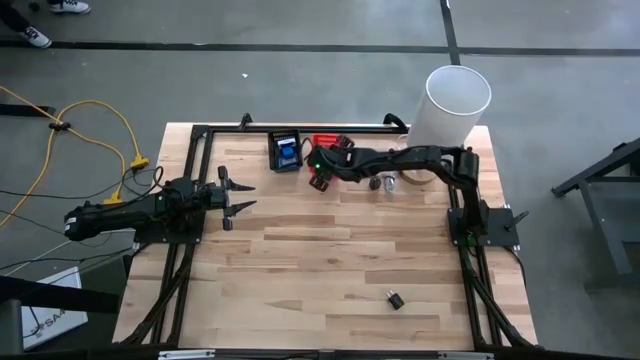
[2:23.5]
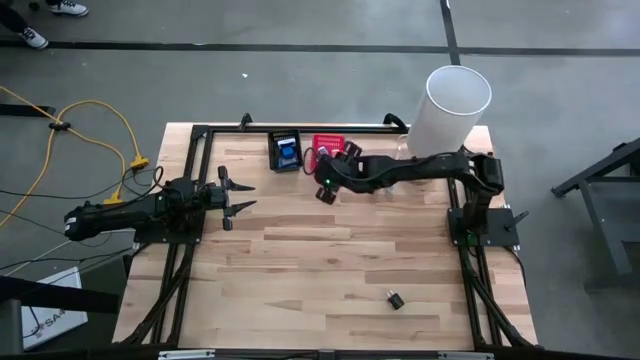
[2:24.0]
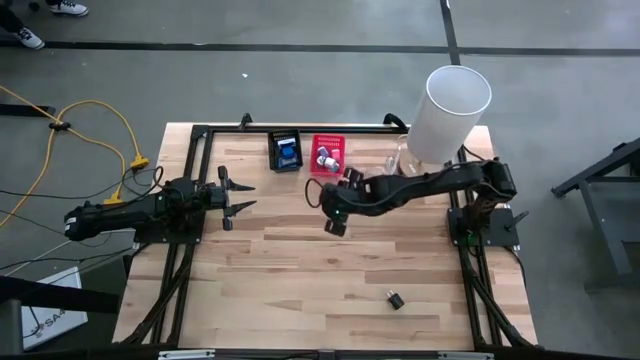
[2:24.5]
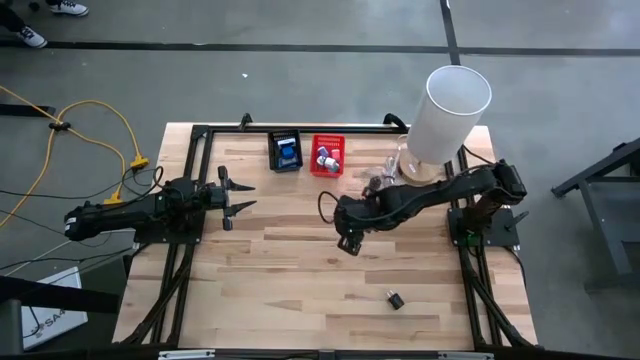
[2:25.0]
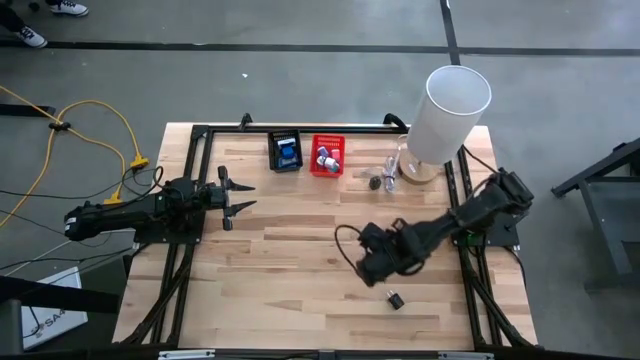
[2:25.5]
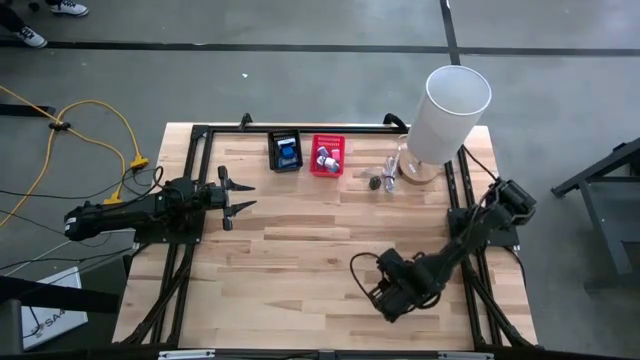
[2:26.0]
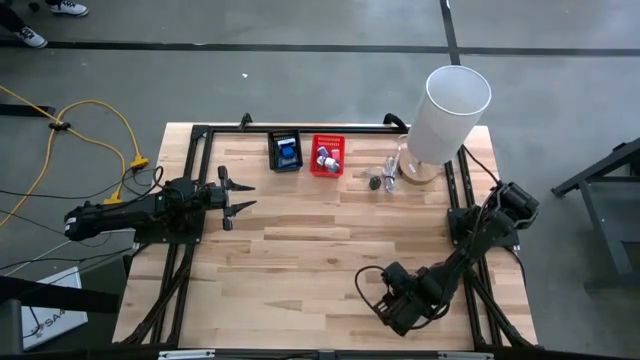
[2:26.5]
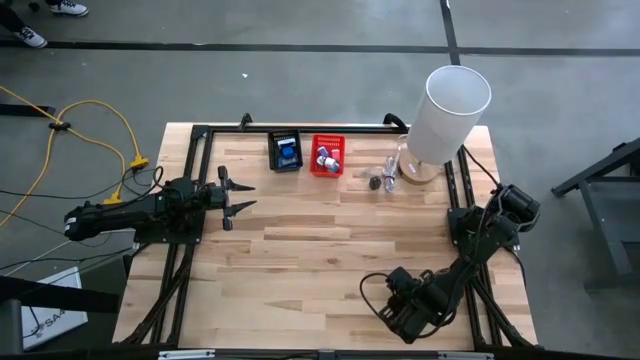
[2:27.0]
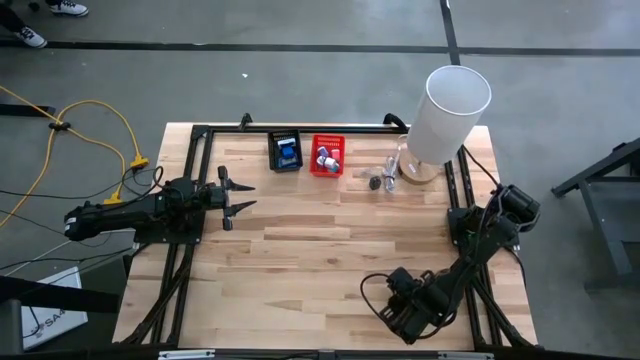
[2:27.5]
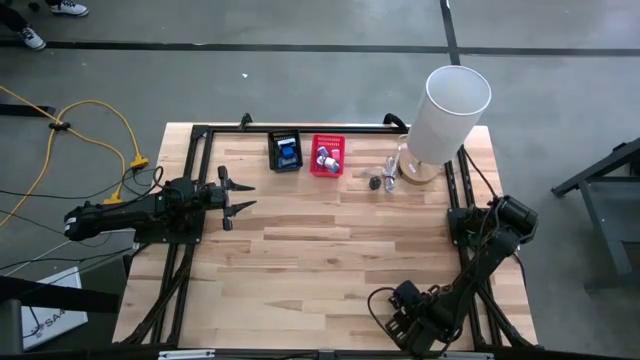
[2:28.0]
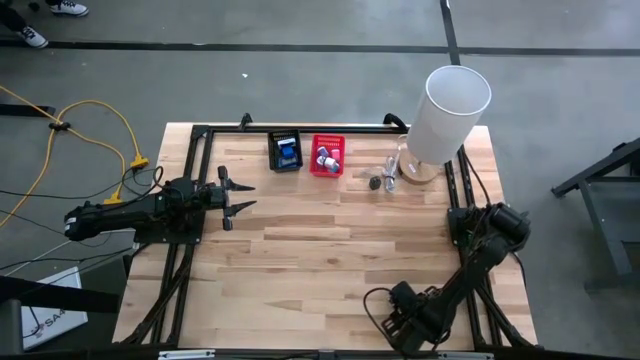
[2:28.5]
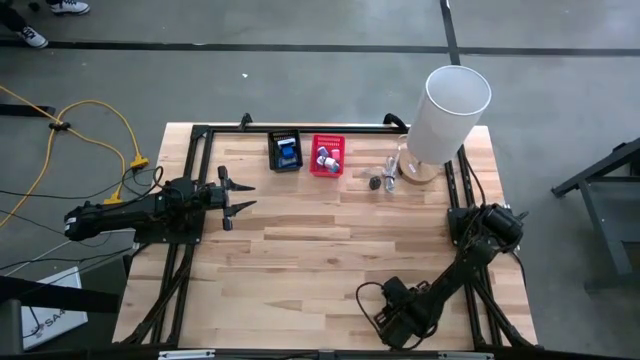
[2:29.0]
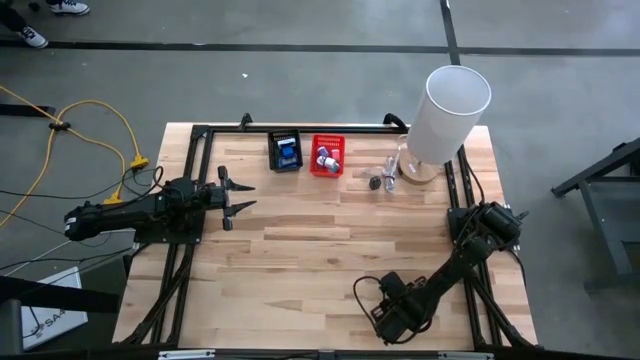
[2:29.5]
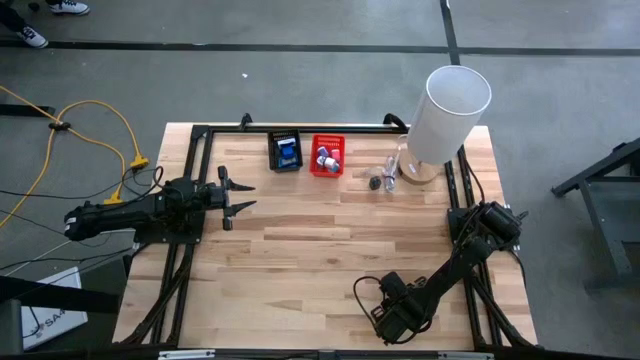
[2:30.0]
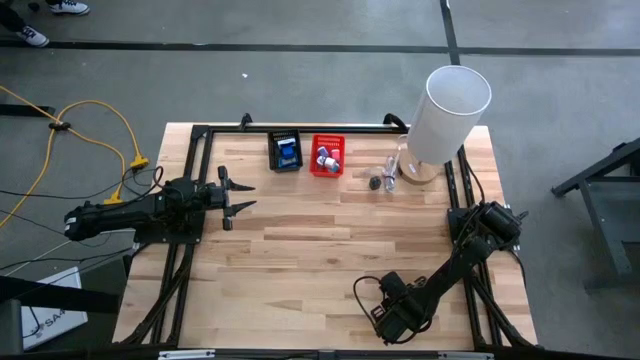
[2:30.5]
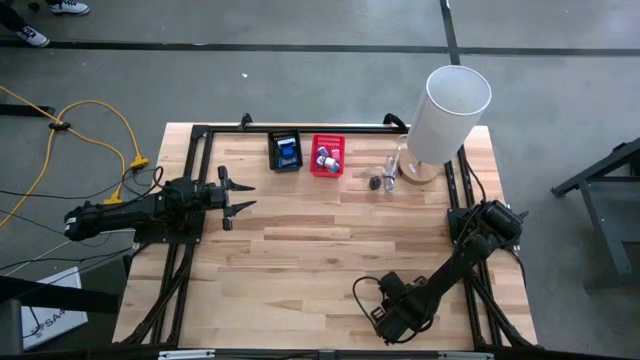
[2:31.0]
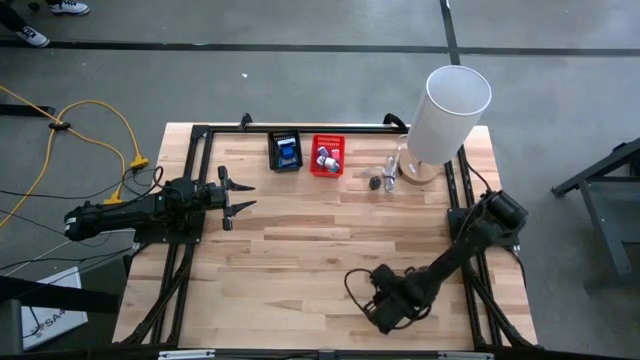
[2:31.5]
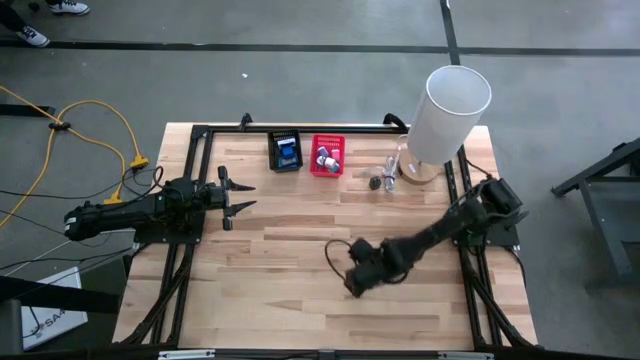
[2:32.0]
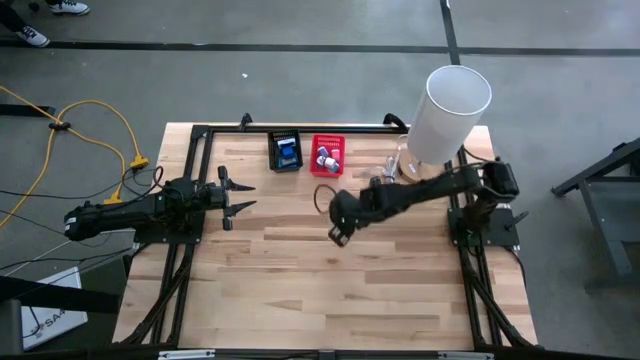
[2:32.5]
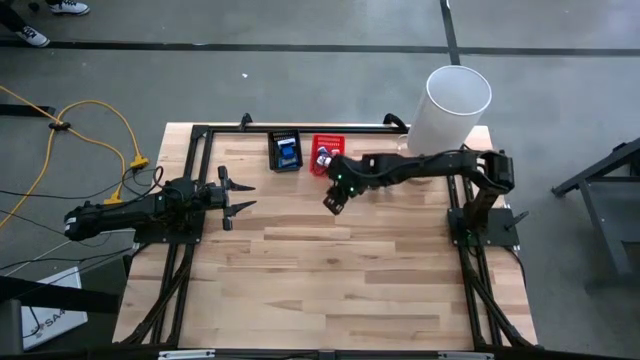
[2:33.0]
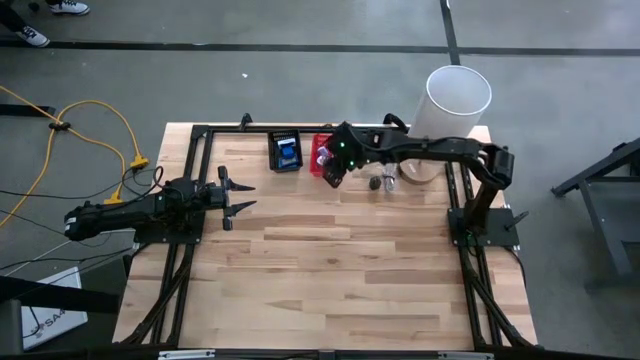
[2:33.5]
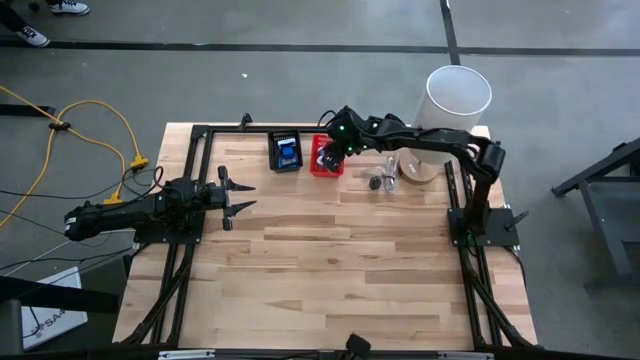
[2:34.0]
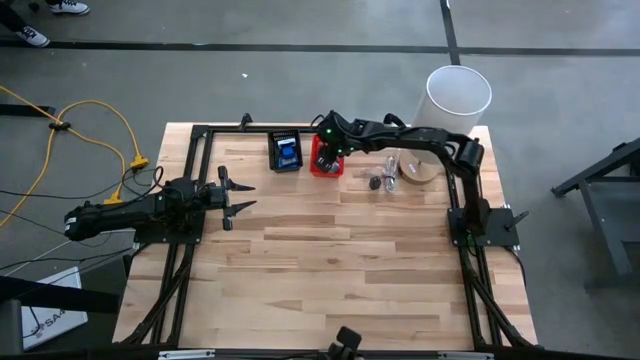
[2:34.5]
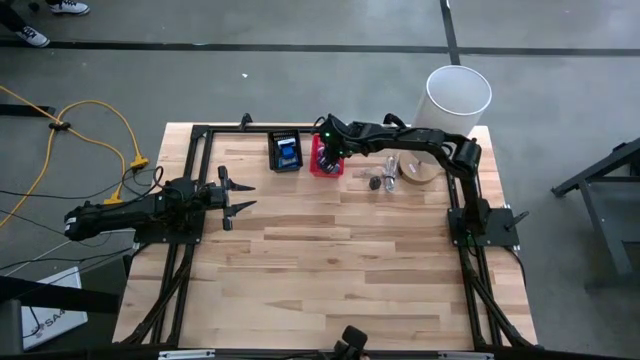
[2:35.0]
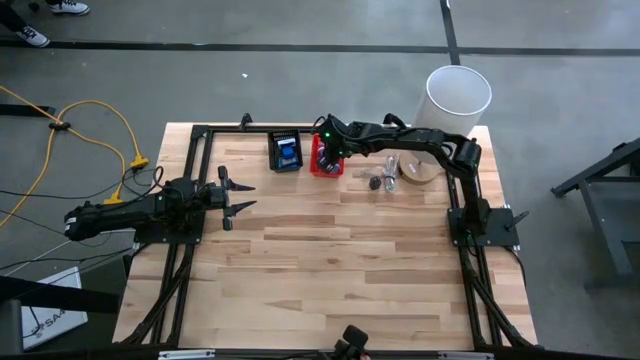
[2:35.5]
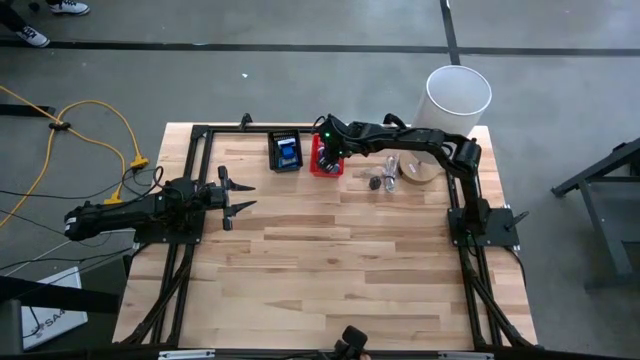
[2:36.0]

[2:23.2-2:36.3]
Task: Pick & Place Office items
Put the bottom black charger adapter into the red basket
